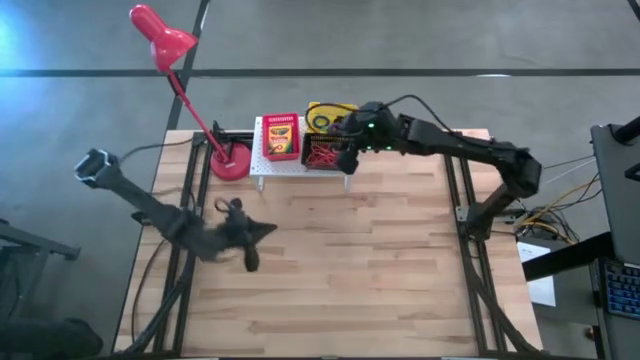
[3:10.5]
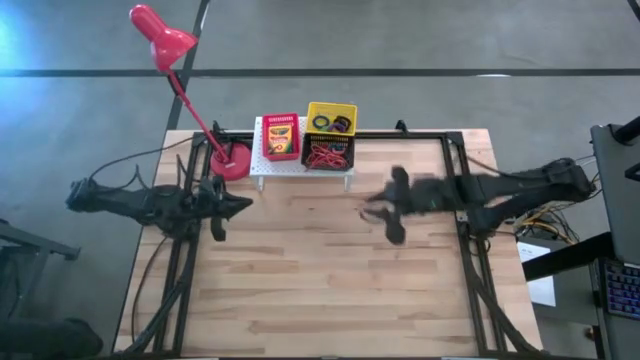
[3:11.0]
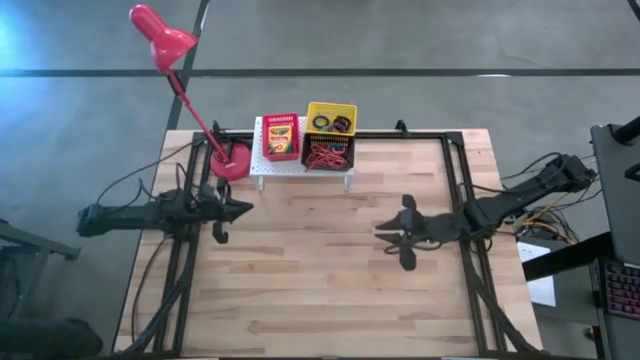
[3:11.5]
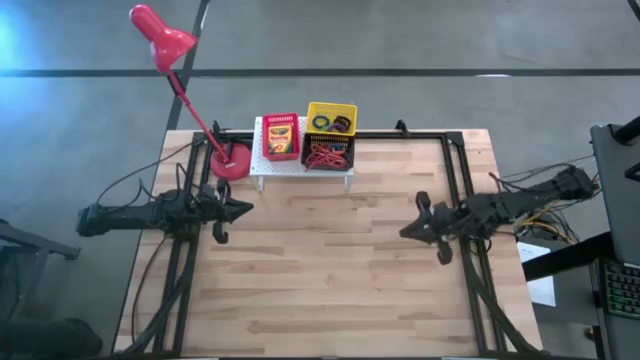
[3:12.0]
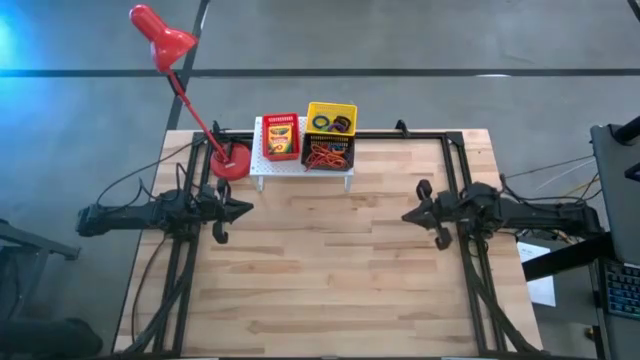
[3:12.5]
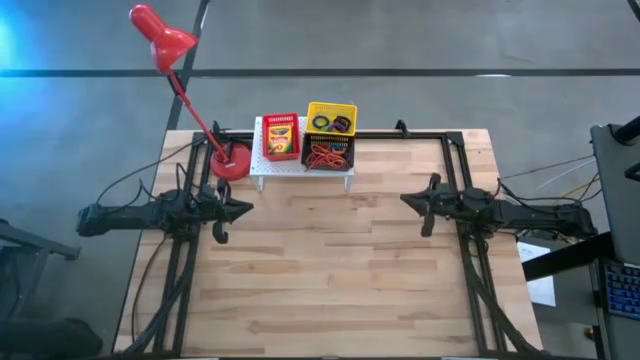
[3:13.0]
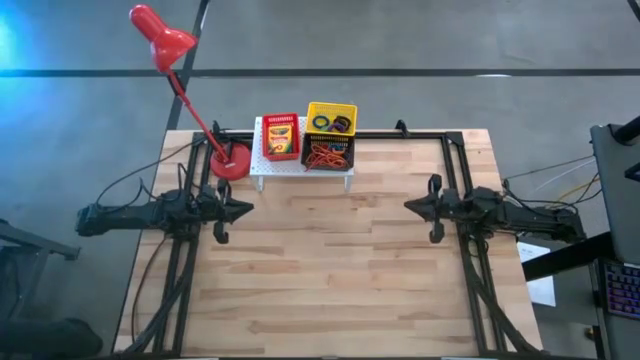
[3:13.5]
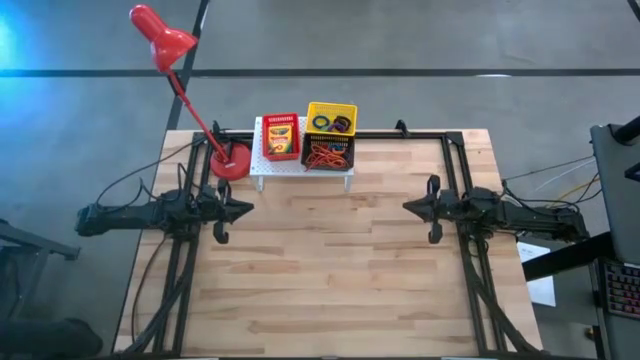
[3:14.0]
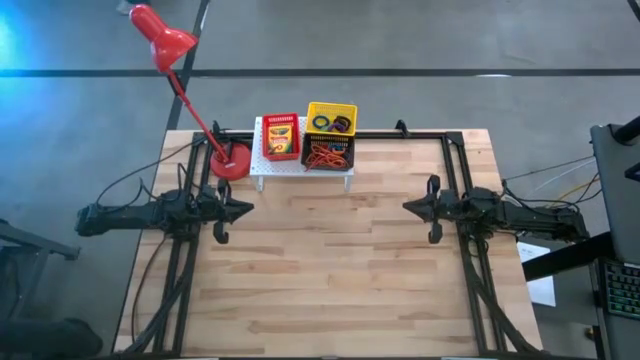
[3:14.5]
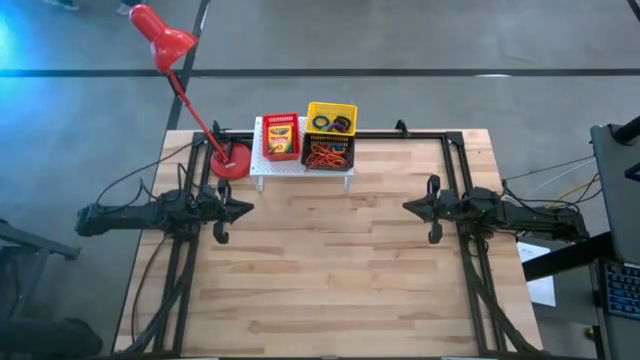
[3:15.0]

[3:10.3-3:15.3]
Task: Pick & Place Office Desk Supplies
Return to Home Position

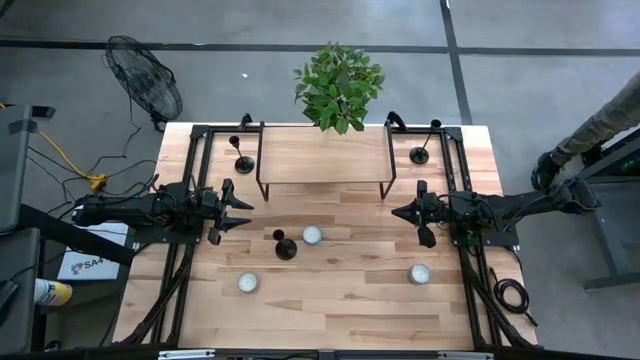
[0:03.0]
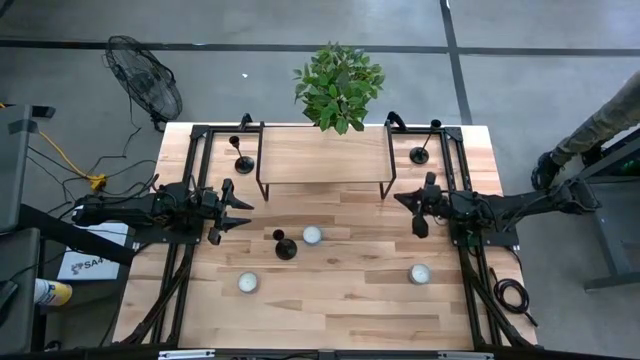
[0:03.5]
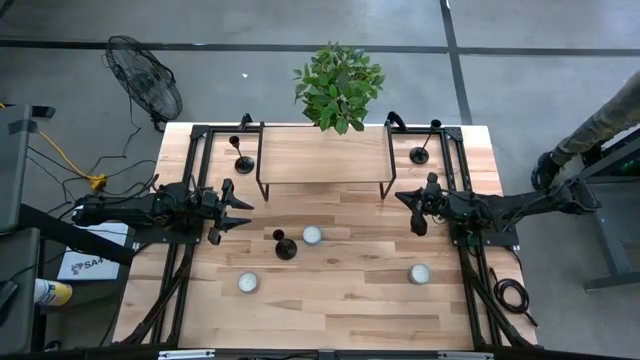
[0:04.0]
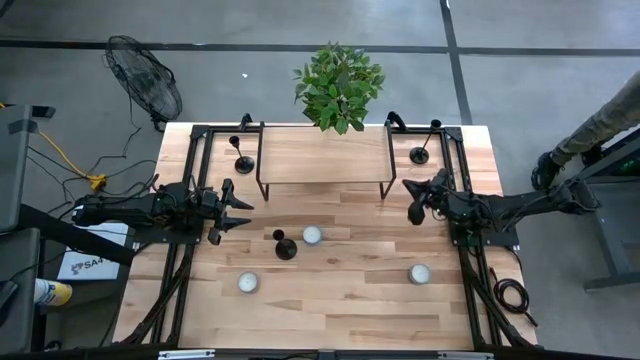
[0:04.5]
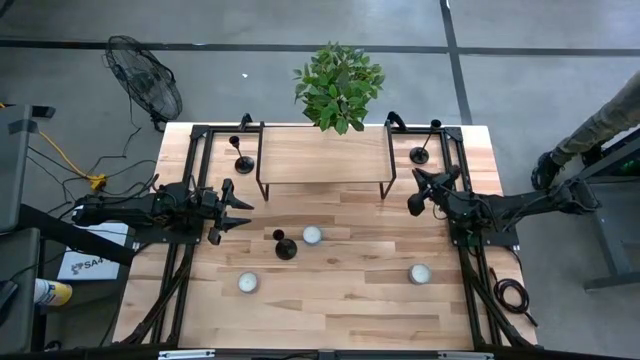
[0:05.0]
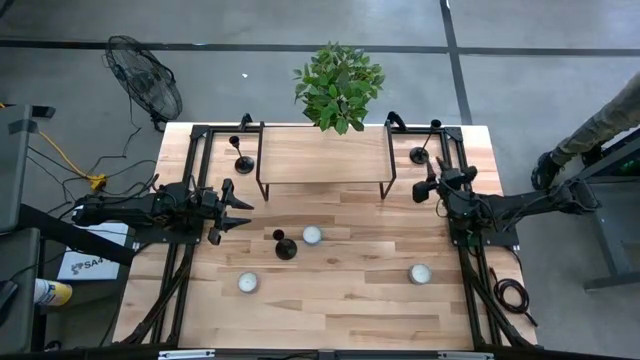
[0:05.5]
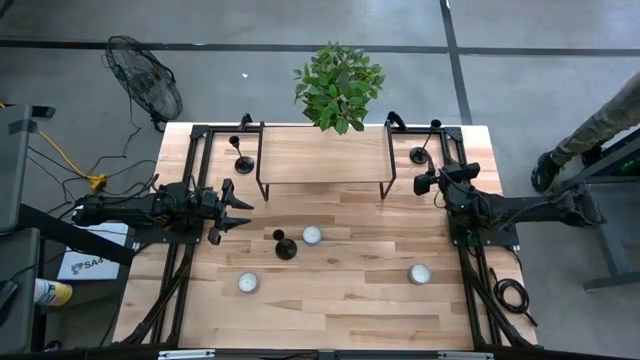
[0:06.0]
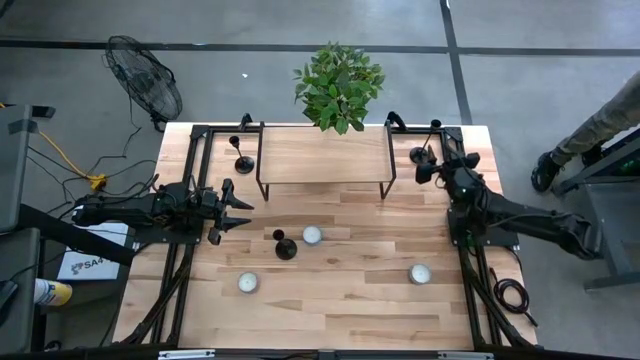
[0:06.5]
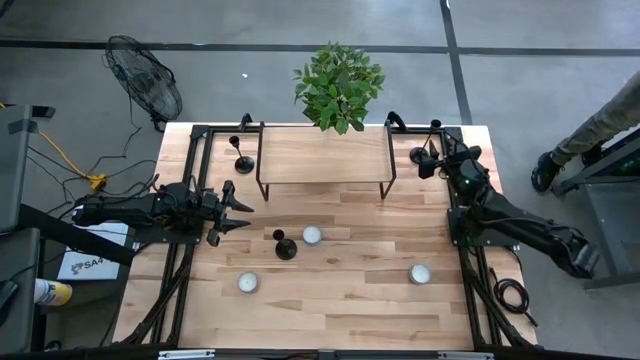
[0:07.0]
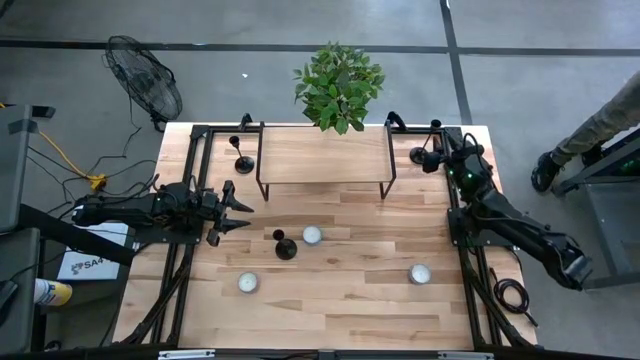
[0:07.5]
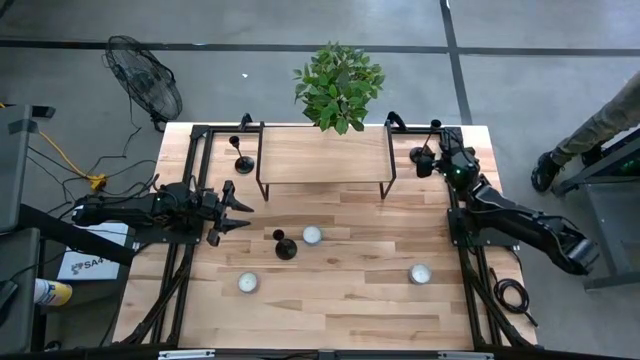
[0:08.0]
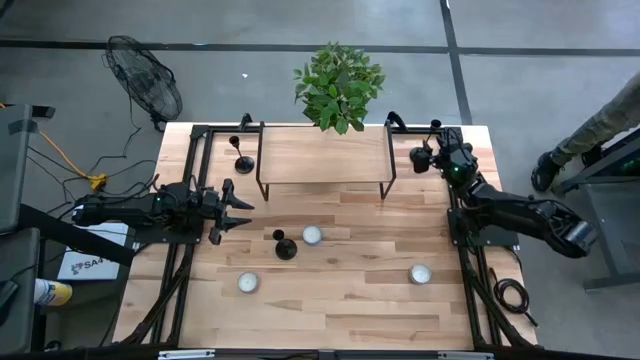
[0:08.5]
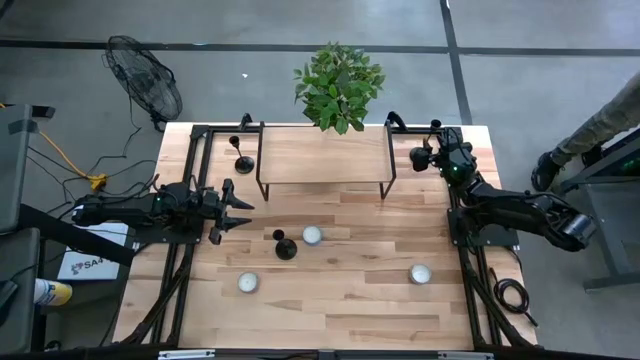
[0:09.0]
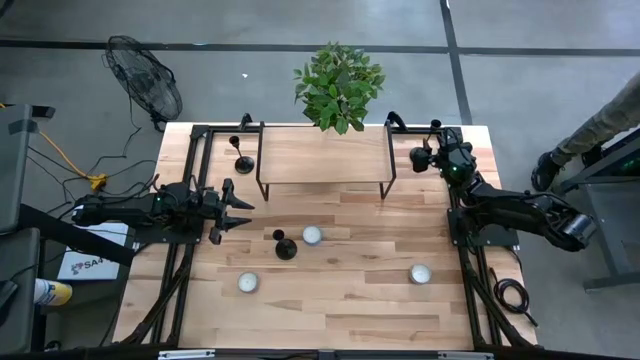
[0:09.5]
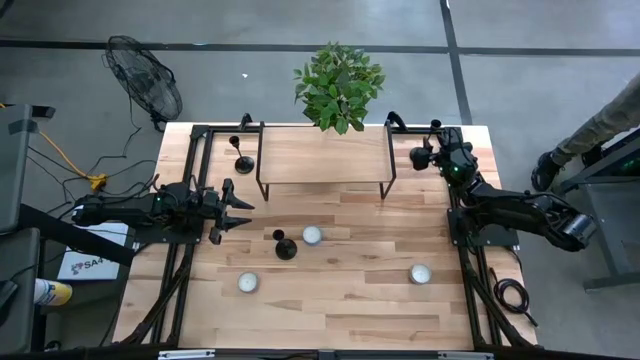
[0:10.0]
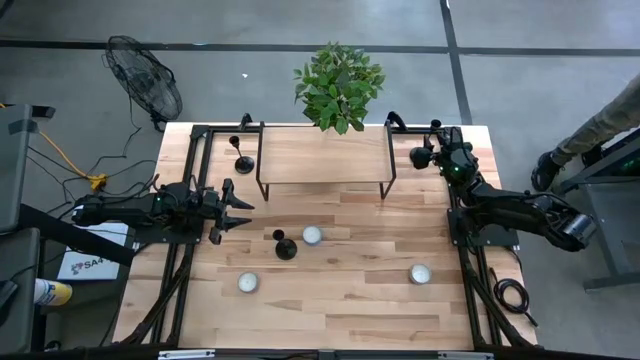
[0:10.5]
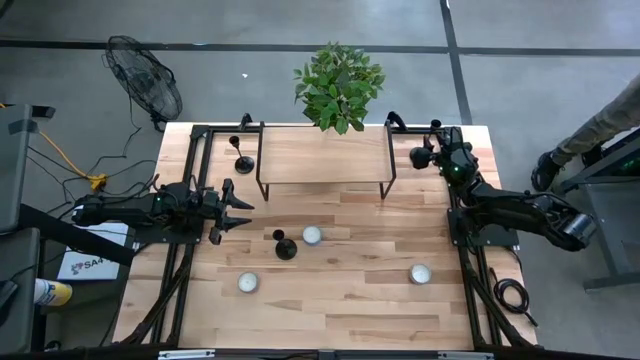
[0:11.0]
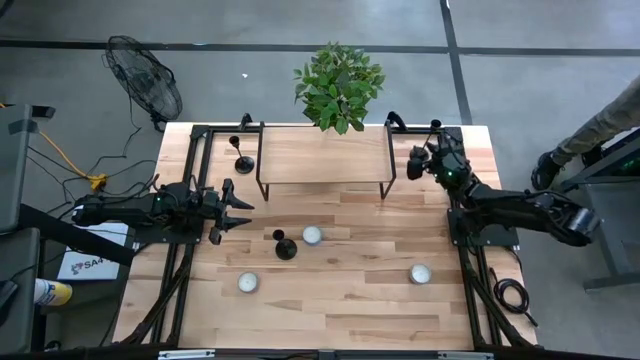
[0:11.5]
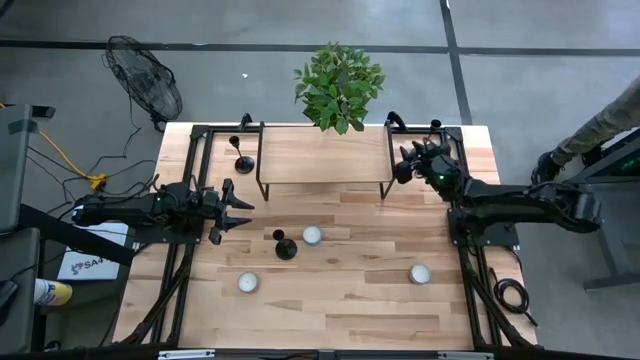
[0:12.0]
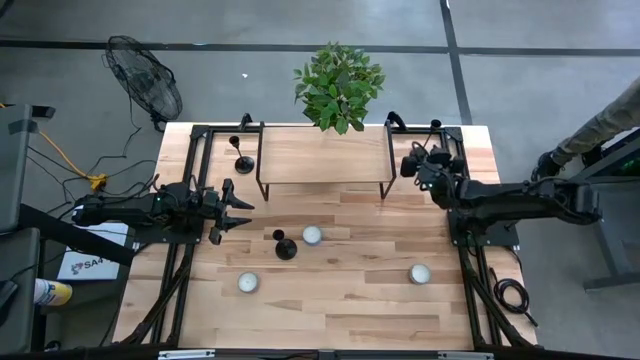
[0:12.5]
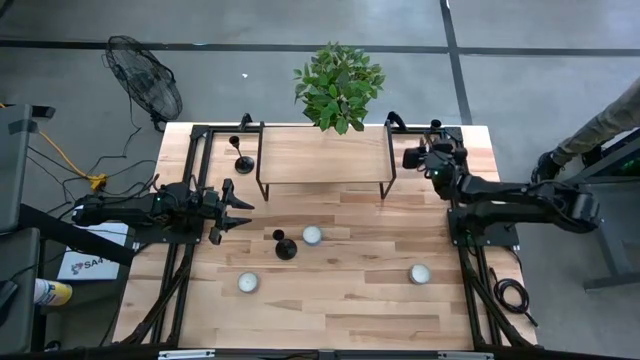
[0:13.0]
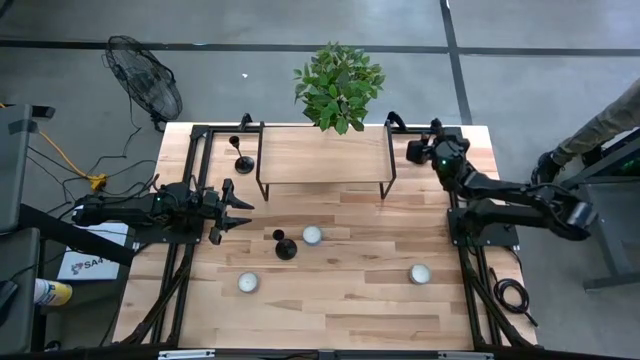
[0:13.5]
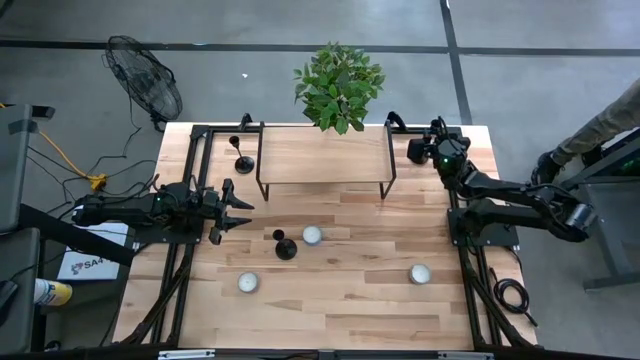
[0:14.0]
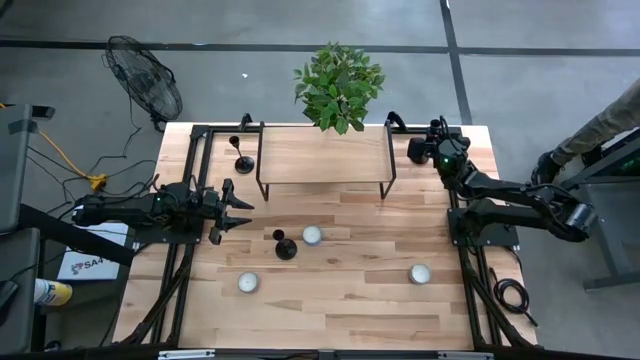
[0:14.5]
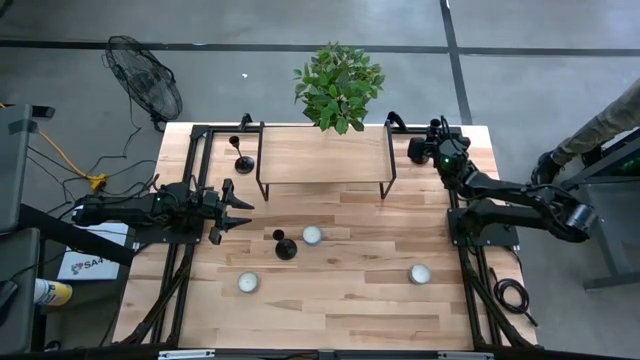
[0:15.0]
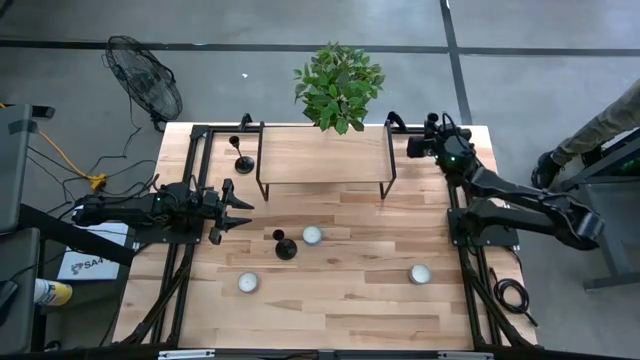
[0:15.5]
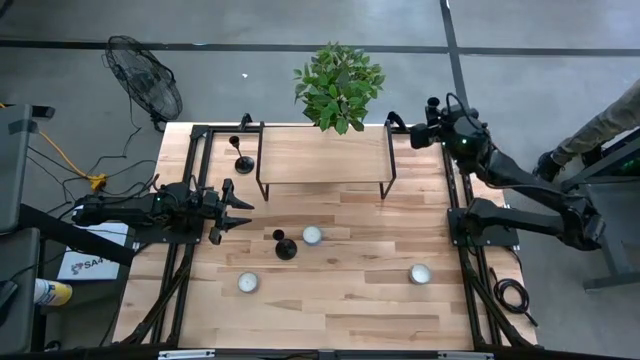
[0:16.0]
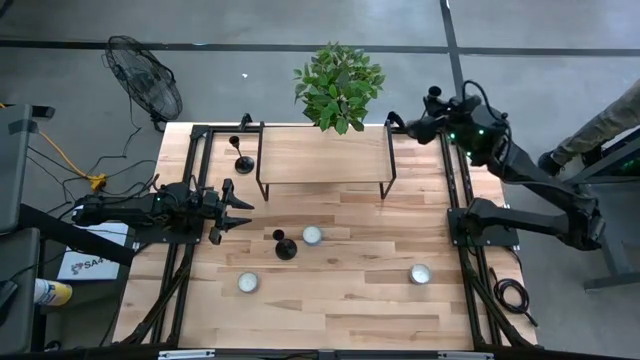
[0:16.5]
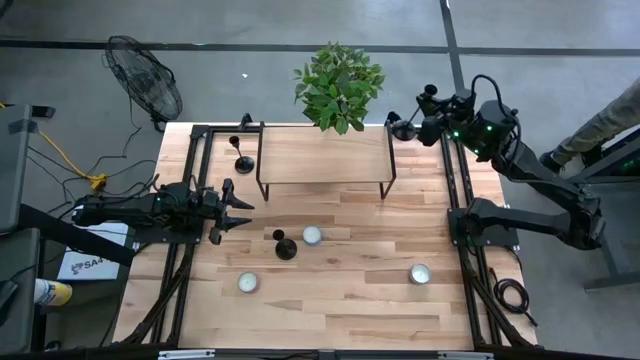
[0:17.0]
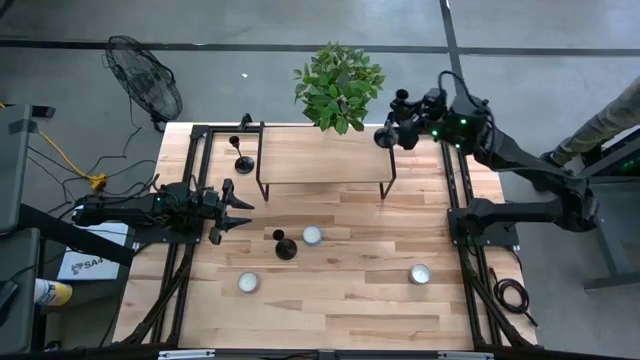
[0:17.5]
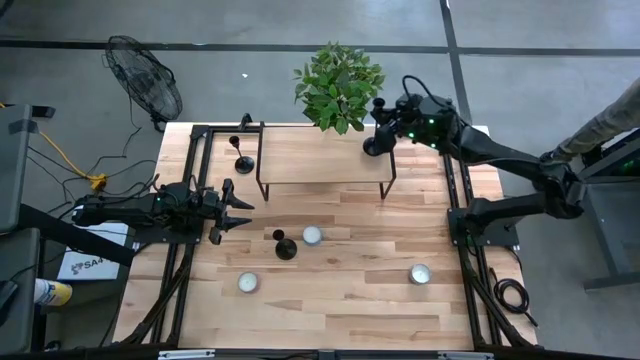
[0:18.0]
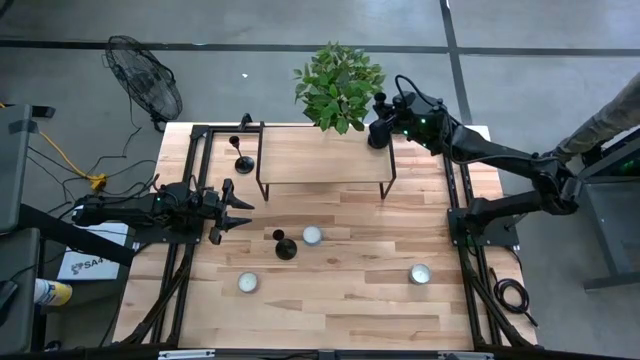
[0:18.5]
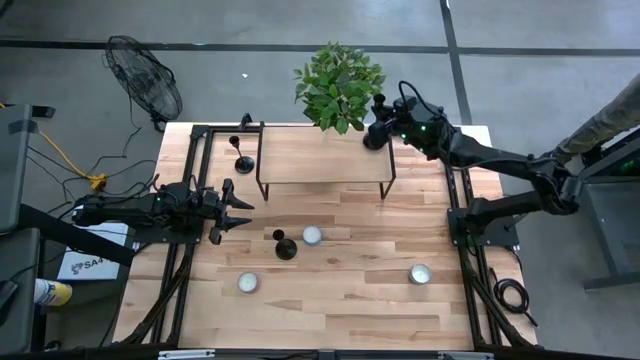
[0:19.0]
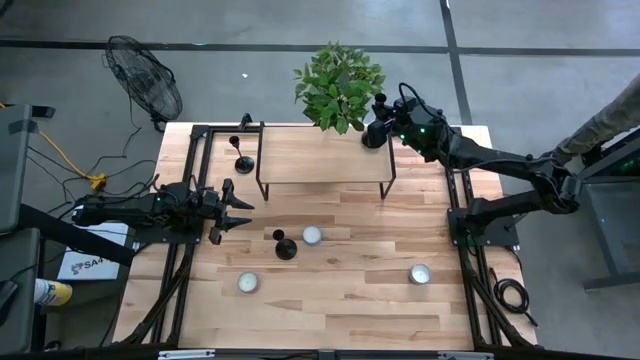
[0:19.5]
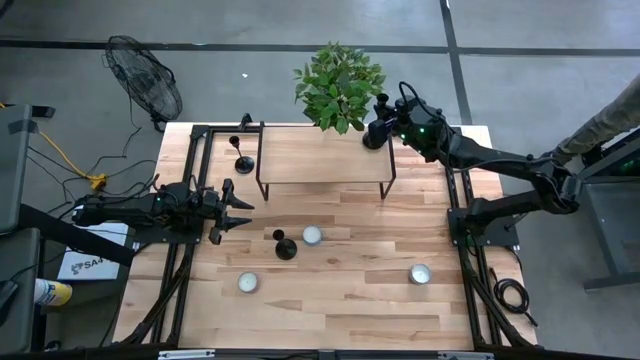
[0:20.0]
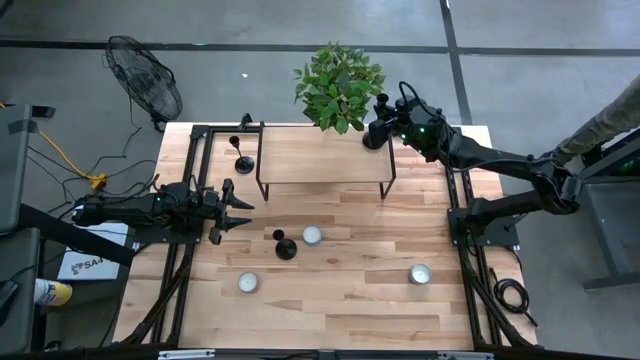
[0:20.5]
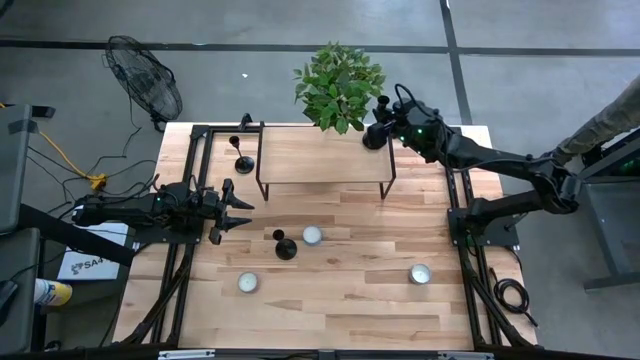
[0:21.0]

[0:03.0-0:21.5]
Task: Pick & Place candle stick holders
Put the right black candle holder on the shelf
